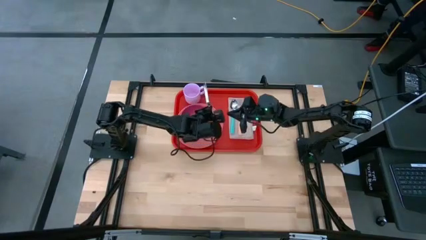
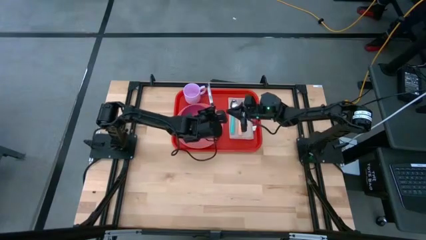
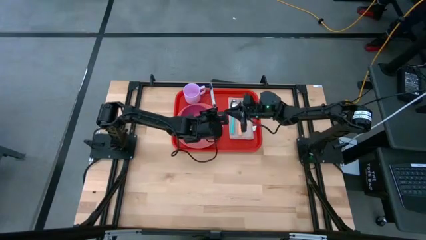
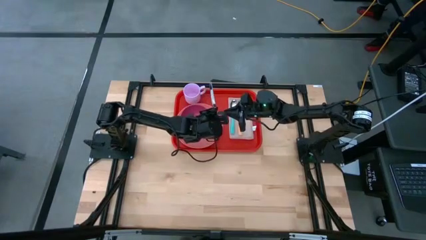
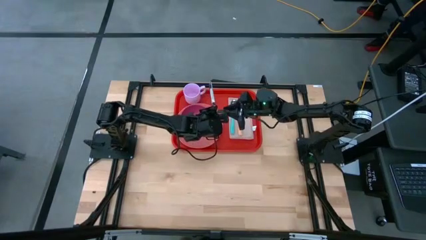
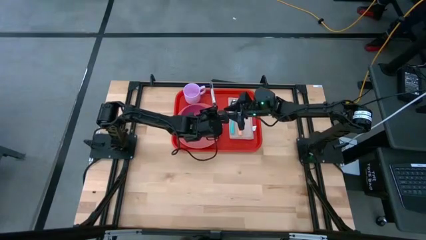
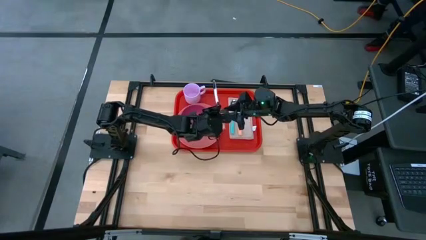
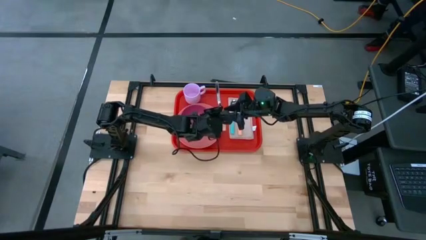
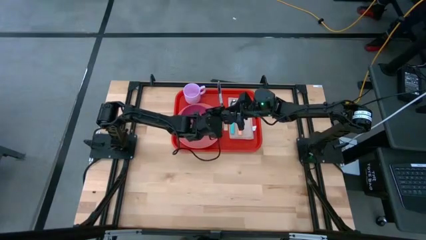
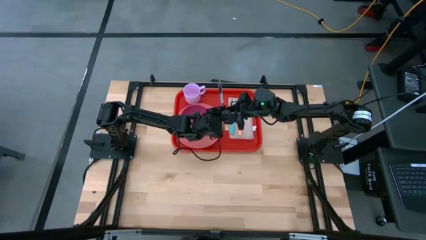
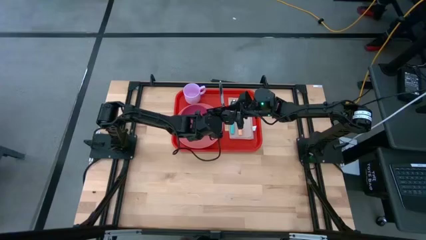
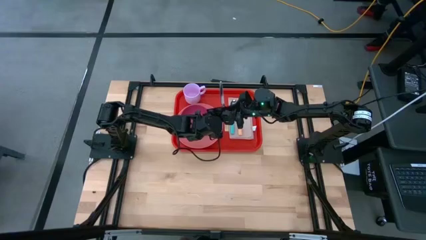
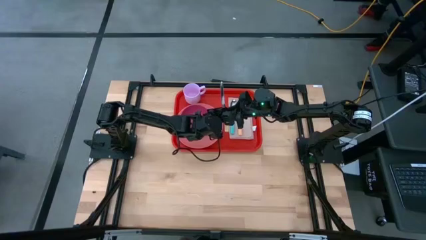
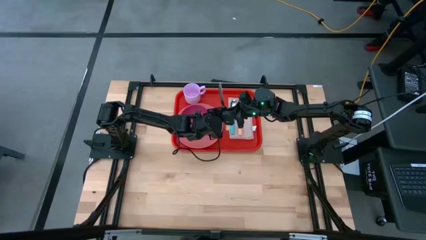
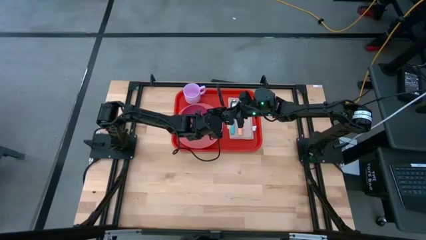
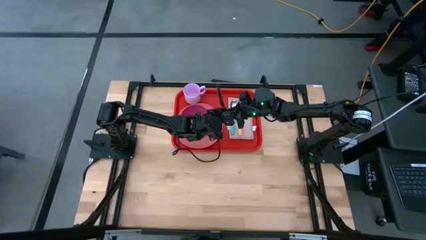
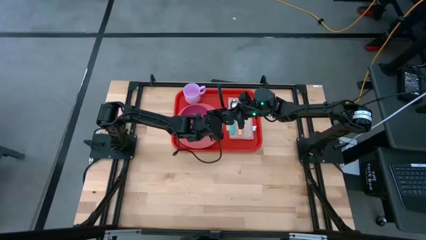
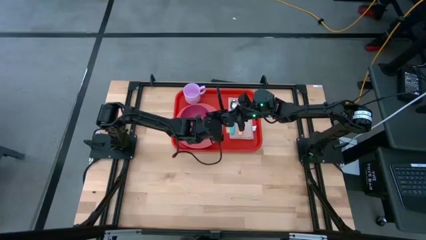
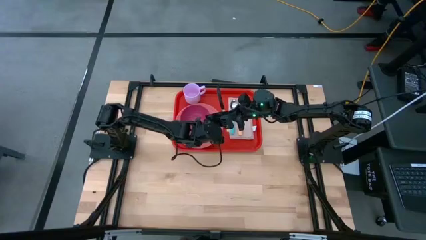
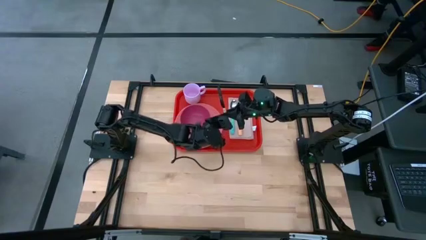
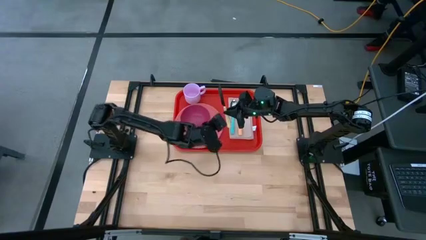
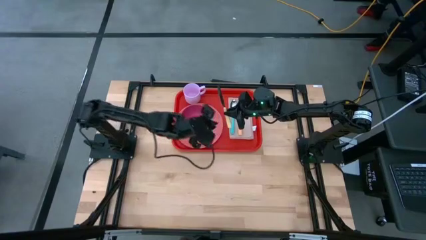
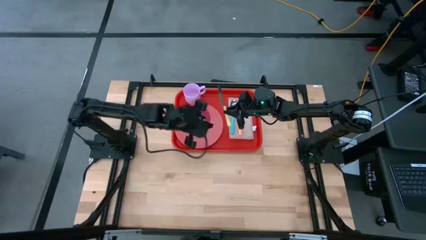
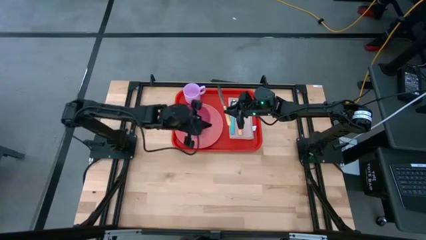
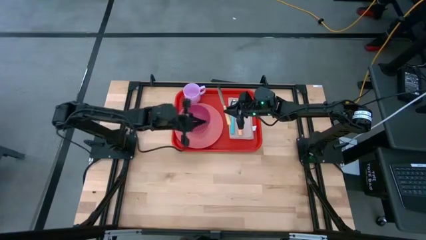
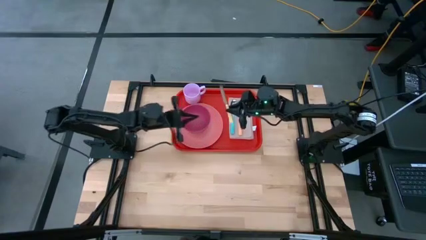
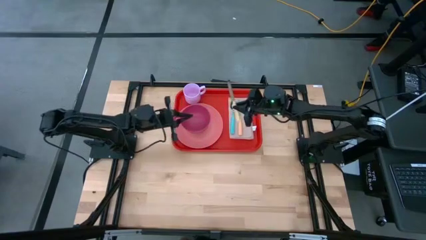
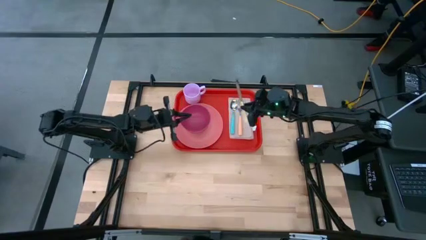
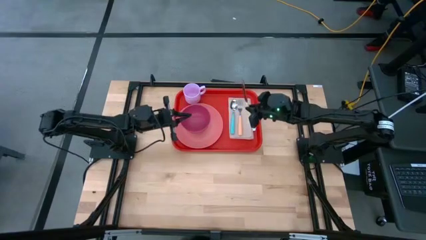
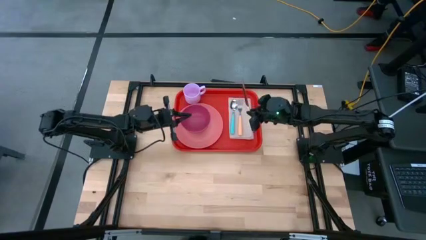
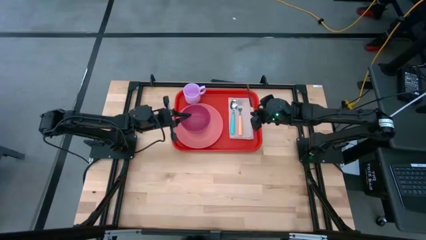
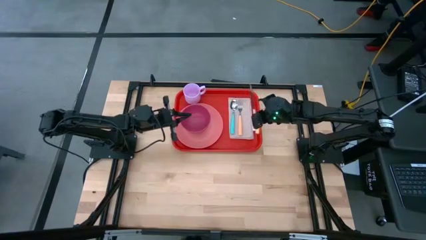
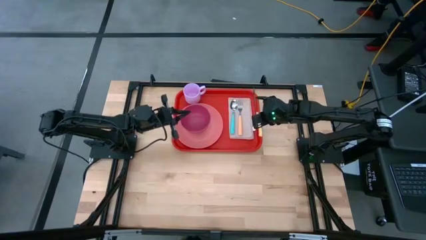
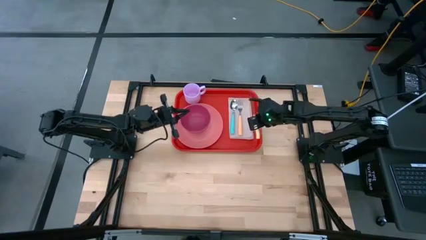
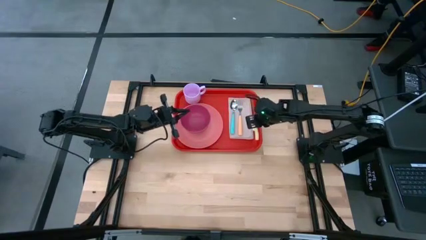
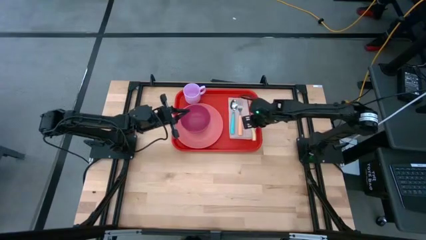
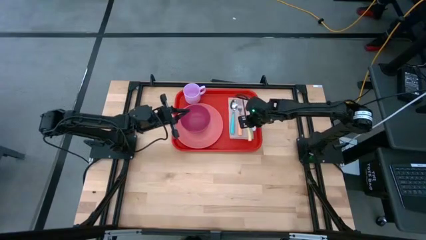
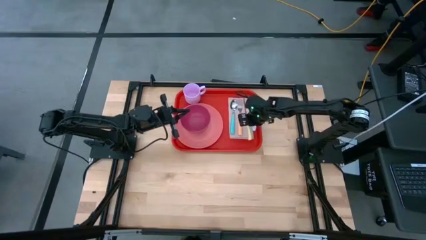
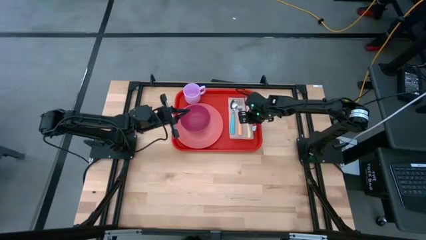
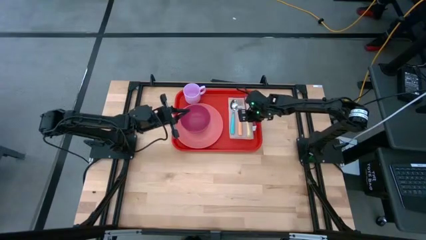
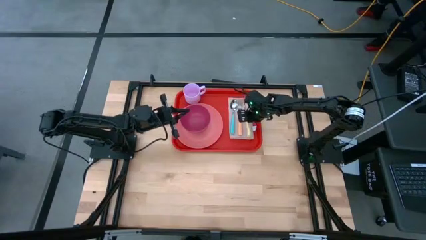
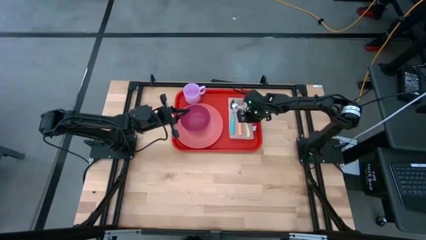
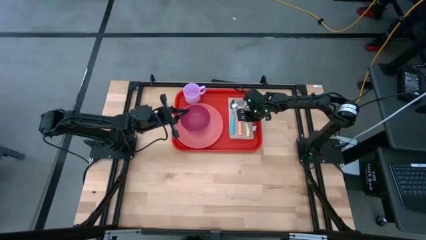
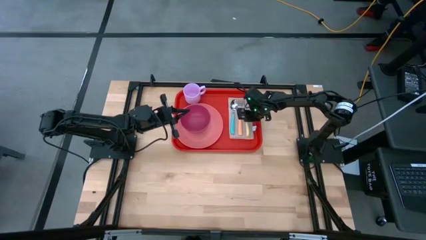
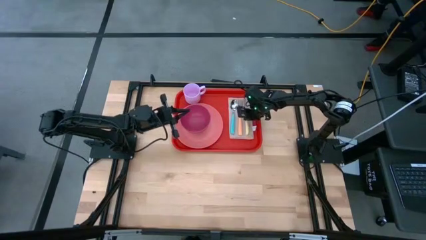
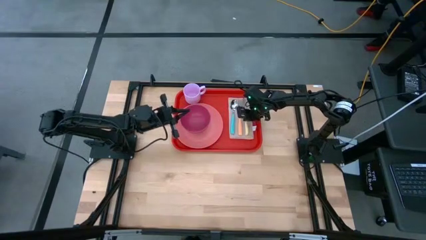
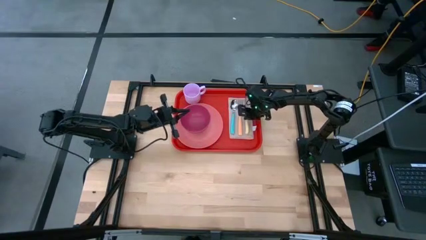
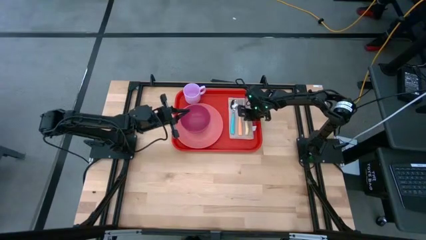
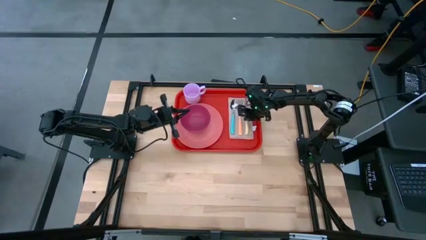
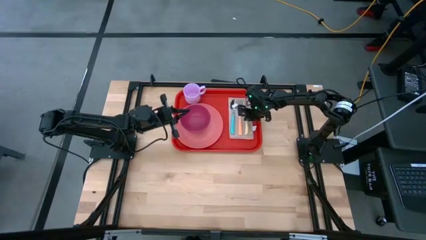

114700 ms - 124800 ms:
Task: Set up tray
Put the yellow knife on the brown napkin to the right of the orange fork

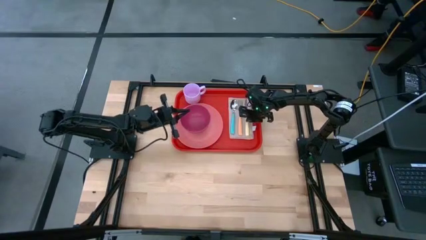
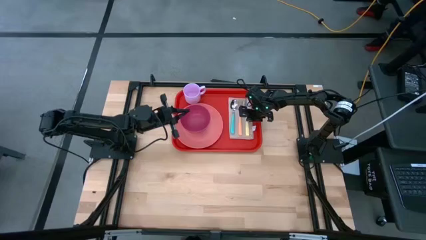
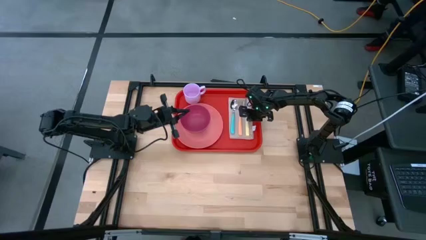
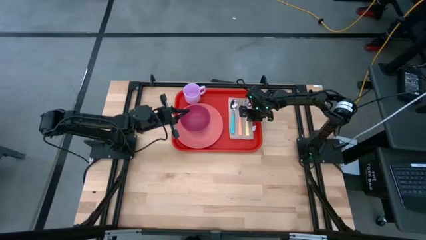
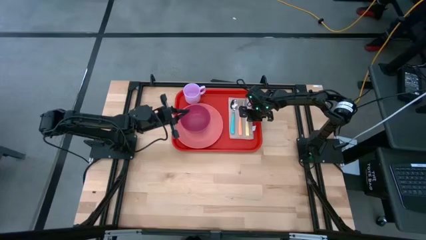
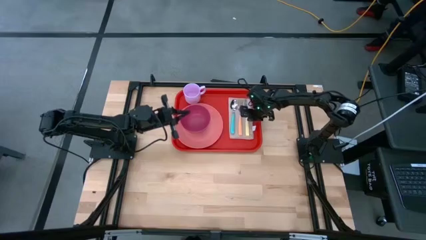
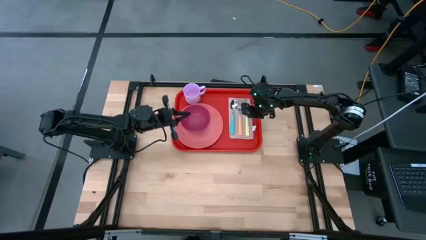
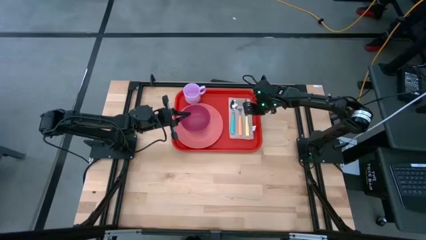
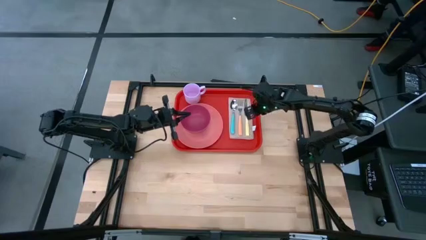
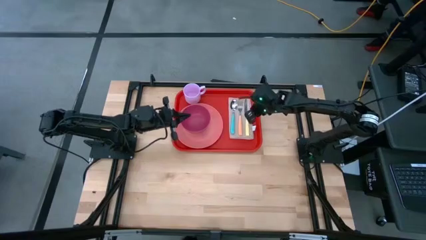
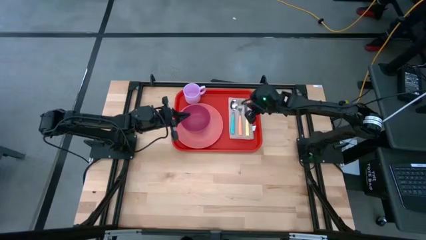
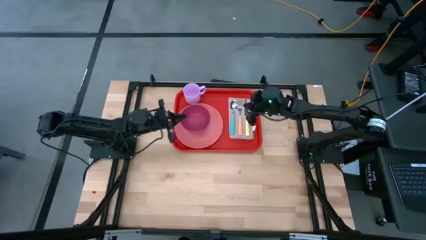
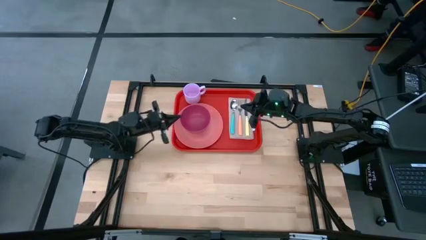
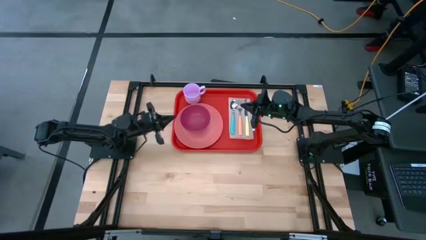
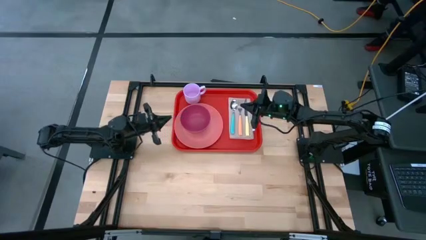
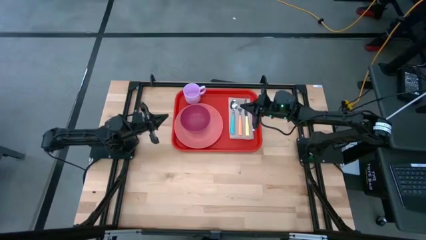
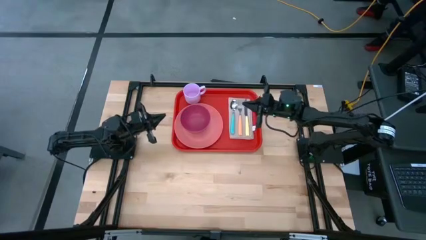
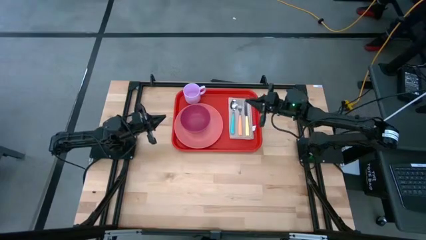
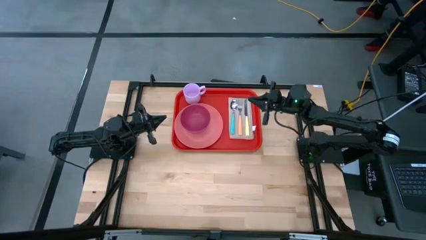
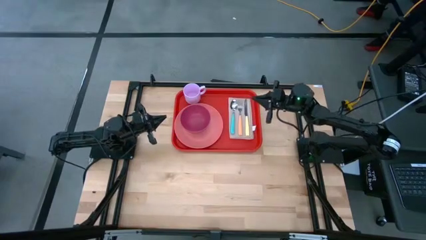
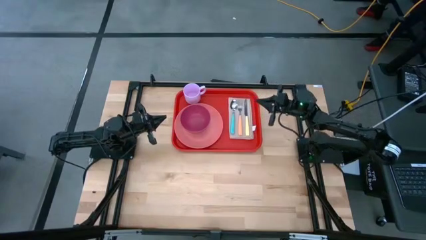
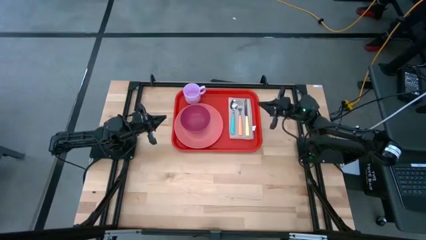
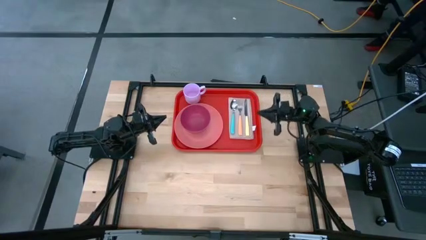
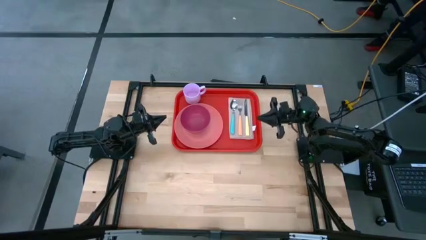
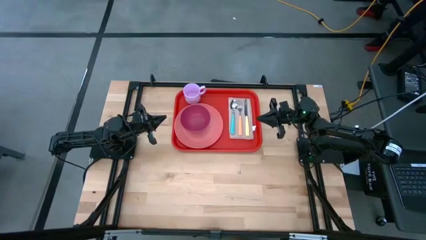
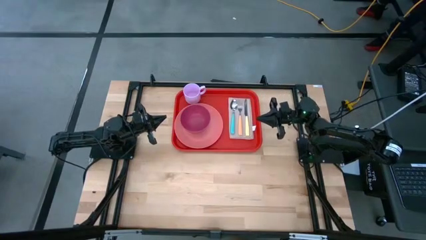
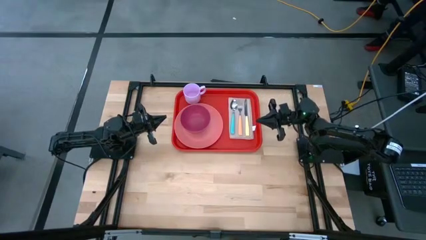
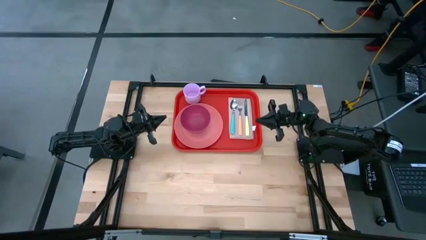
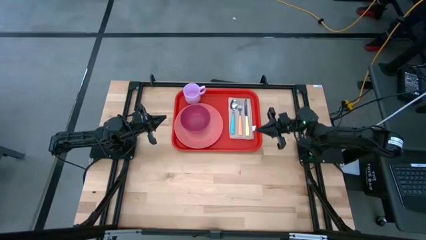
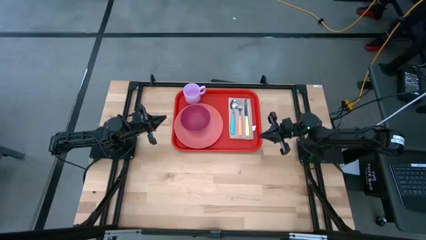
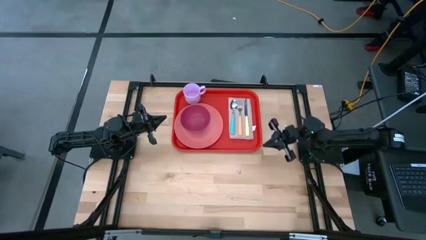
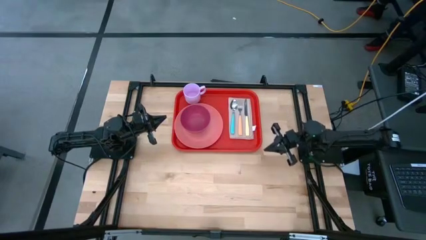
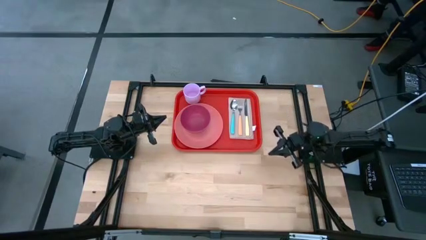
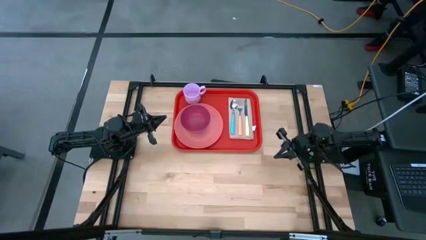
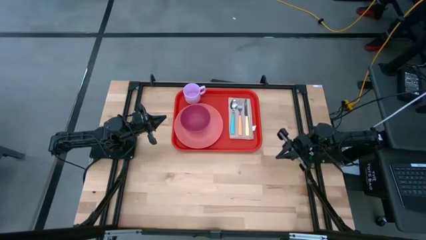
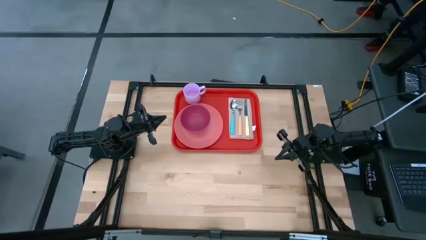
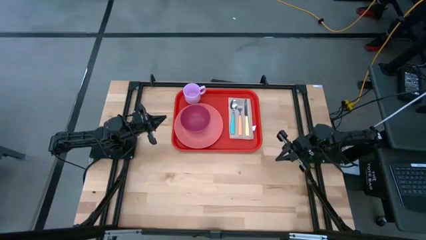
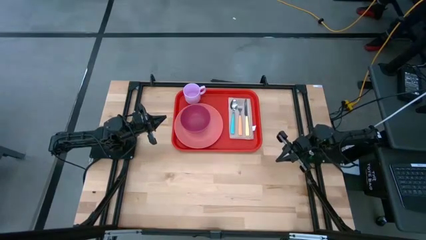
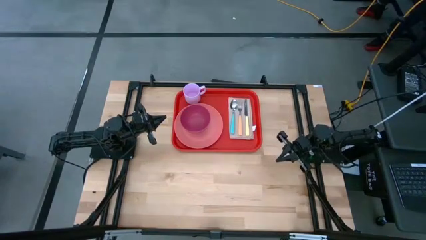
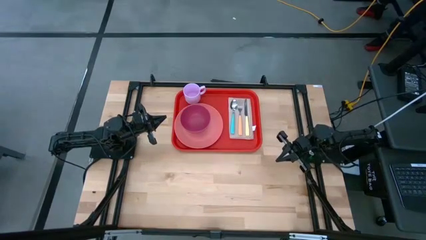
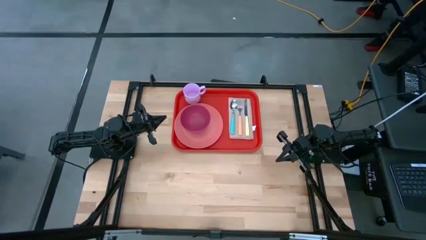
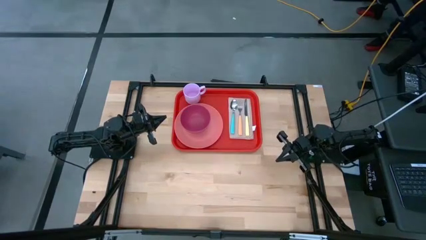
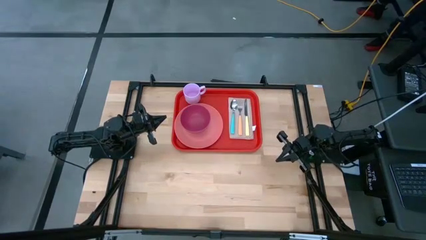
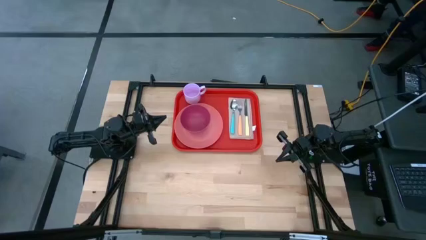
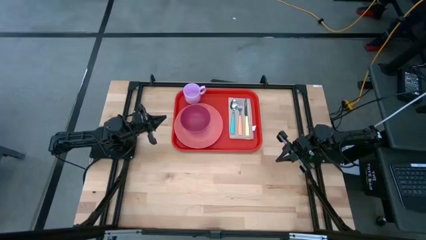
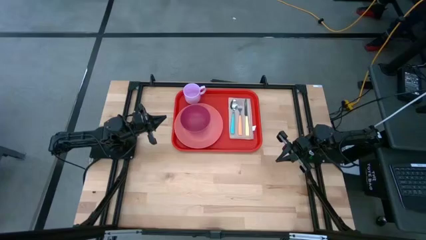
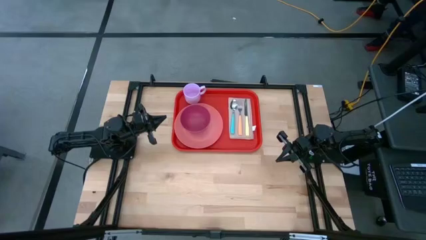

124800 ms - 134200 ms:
Return to Home Position
